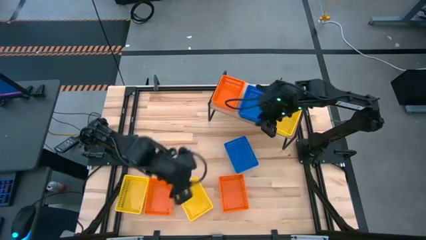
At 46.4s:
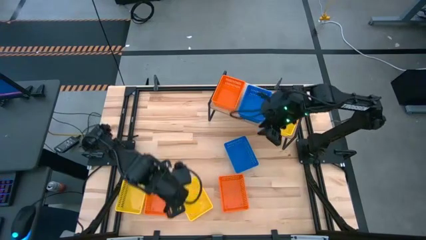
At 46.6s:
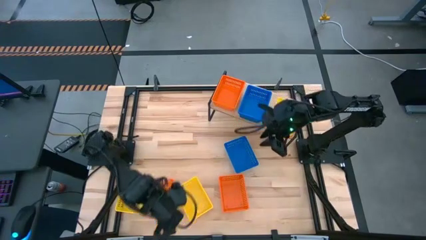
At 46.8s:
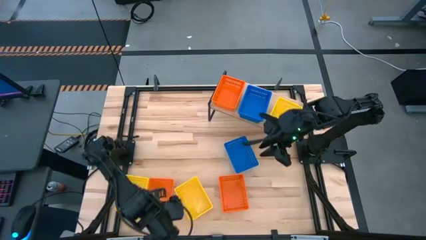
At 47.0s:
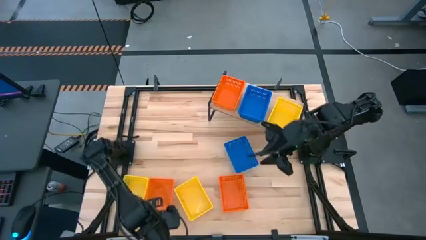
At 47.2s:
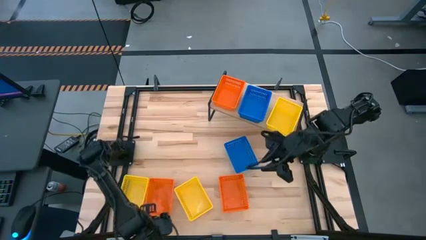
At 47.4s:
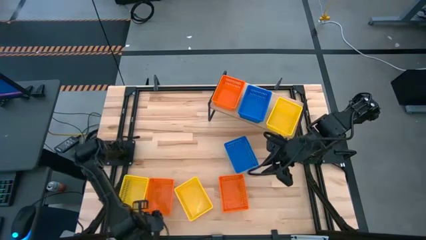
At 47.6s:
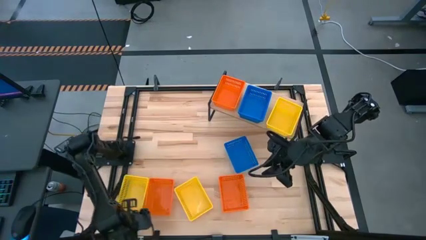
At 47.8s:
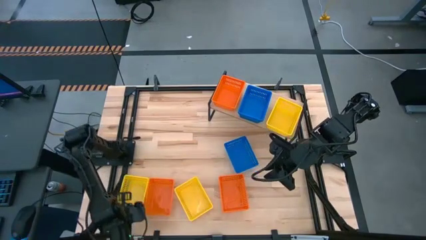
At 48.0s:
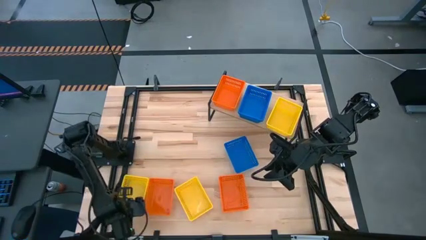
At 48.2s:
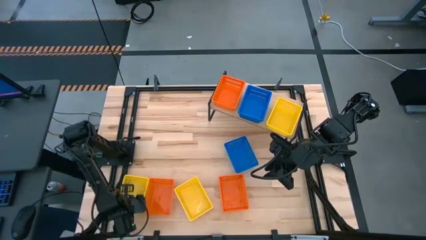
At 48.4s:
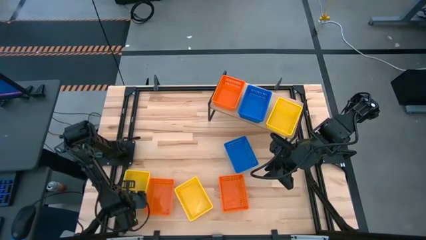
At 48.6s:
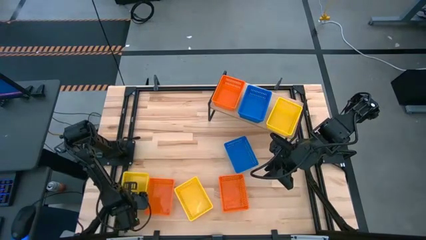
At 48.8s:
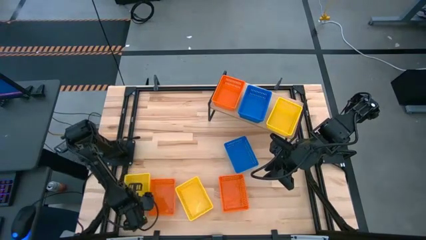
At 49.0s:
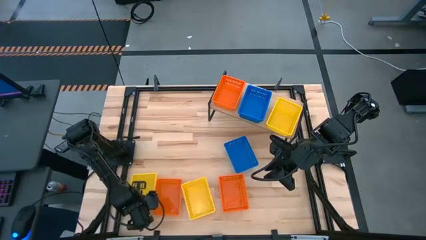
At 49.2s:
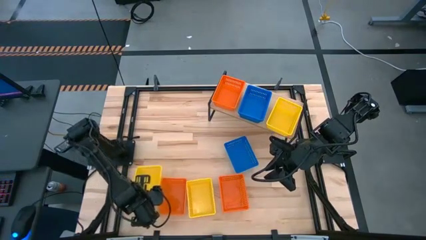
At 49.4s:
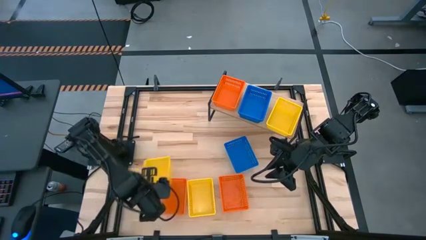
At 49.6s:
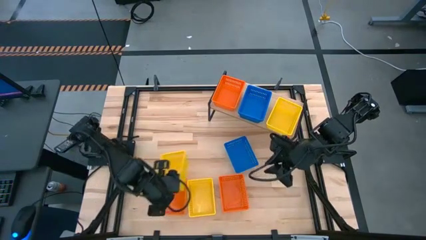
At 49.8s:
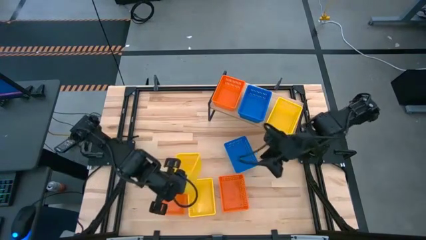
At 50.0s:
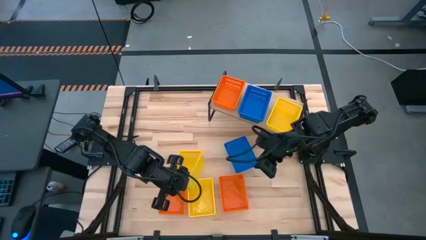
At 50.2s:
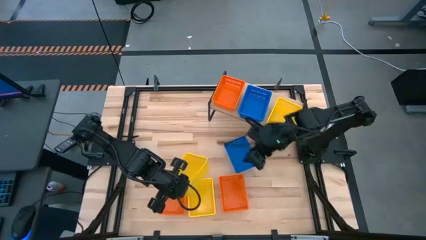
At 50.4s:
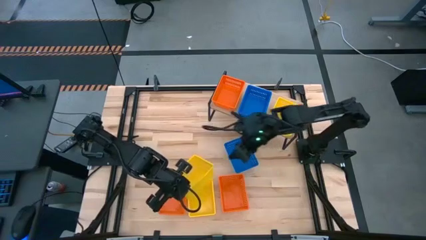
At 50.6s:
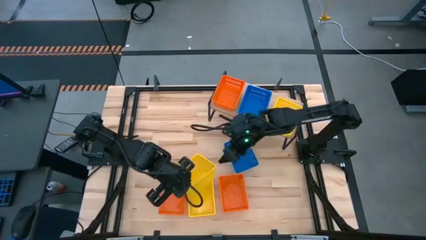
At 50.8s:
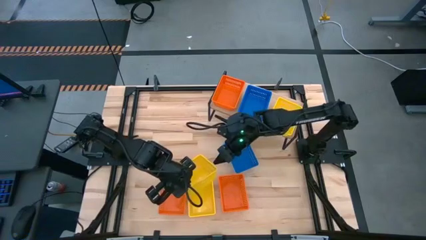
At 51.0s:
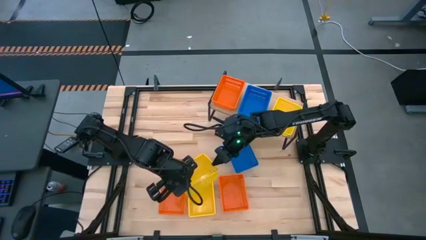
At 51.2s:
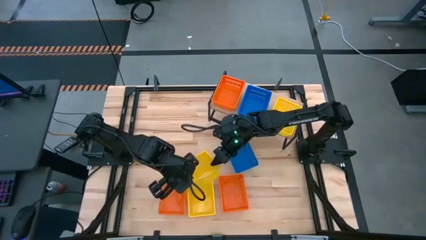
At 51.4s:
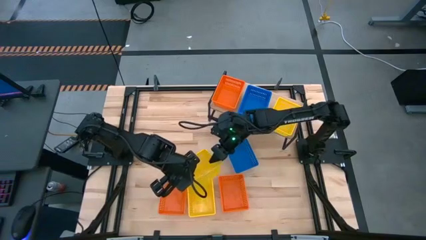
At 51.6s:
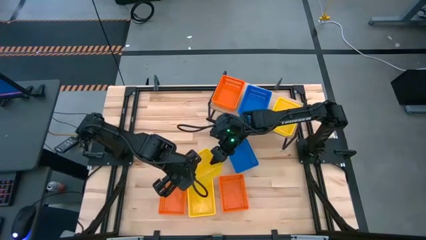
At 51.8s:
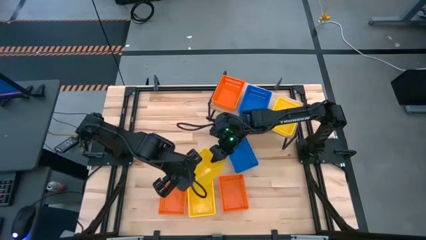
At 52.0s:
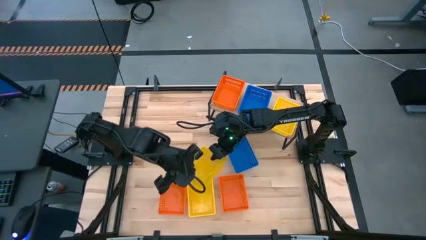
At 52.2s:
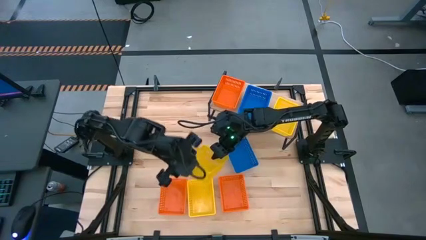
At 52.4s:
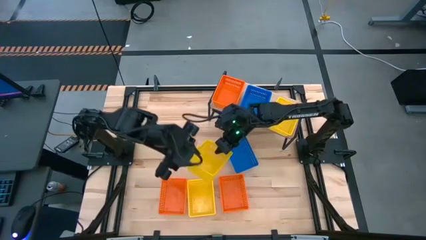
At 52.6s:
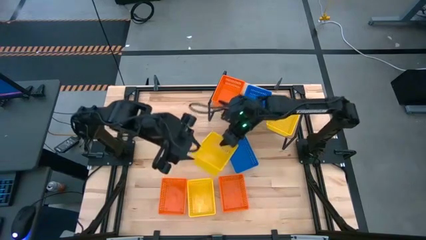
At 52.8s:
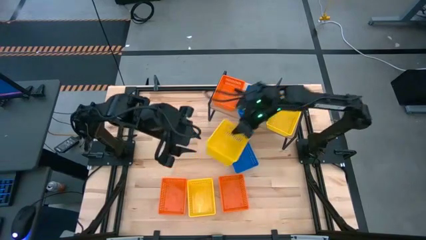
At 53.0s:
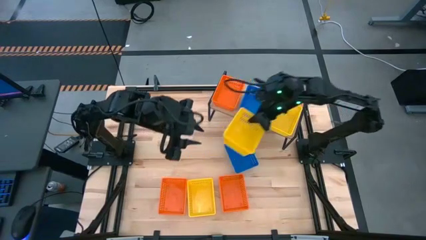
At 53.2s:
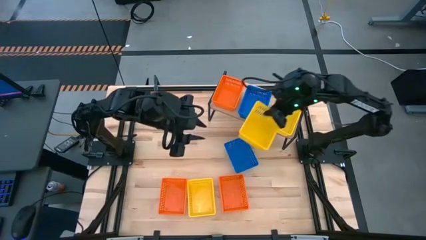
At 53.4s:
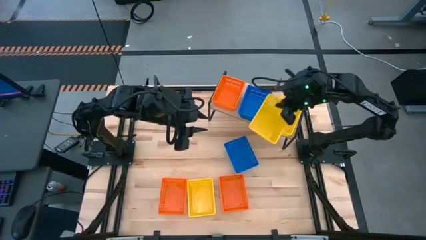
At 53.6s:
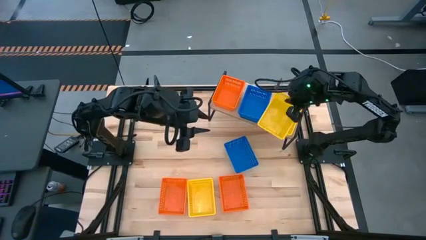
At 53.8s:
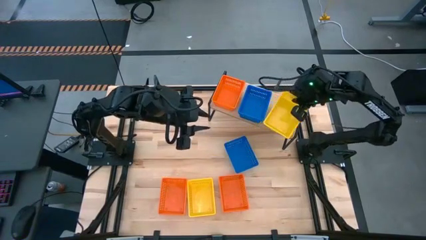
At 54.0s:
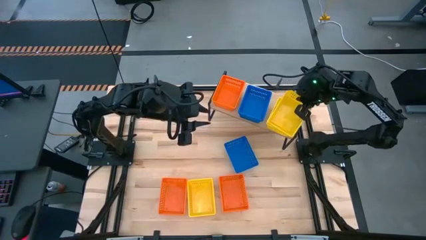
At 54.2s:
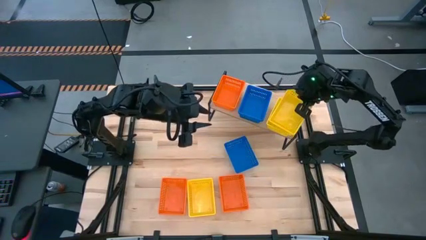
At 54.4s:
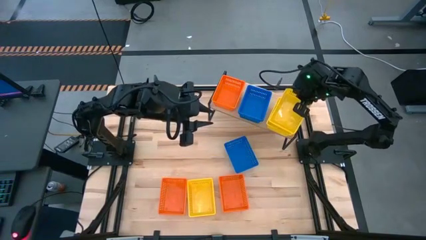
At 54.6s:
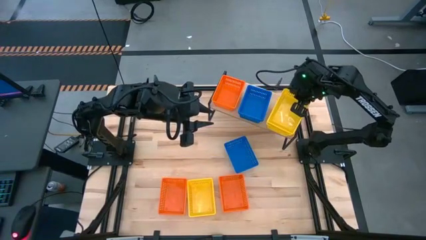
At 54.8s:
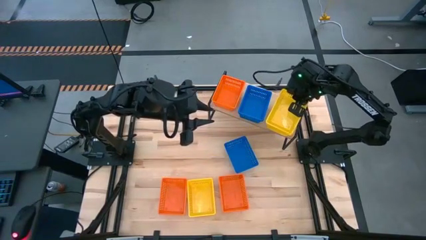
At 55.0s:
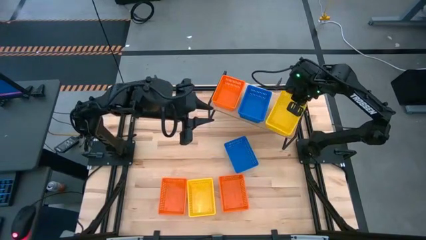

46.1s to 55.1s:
Task: Stack baskets on shelf by color
Stack the left yellow basket on the yellow basket on the shelf

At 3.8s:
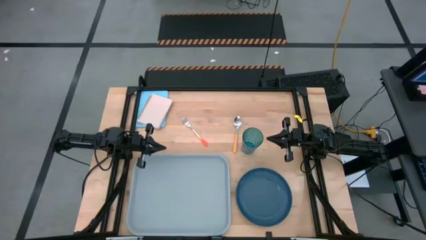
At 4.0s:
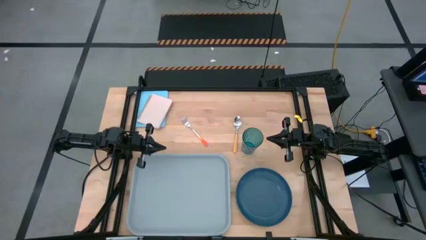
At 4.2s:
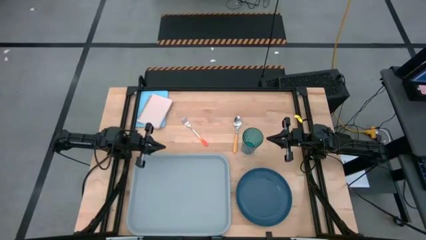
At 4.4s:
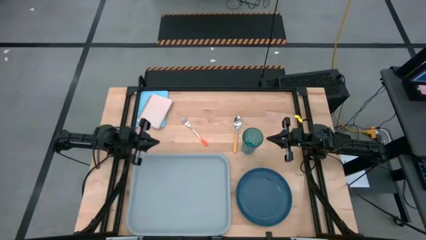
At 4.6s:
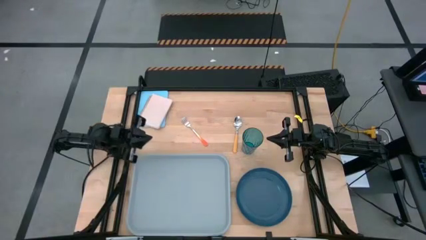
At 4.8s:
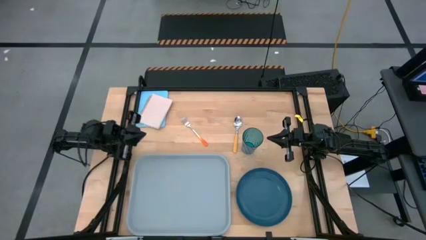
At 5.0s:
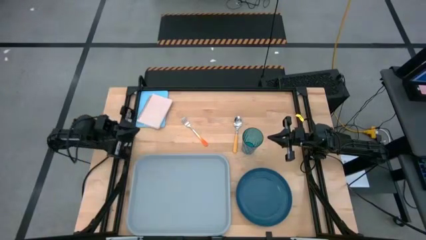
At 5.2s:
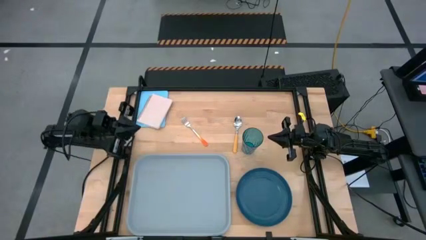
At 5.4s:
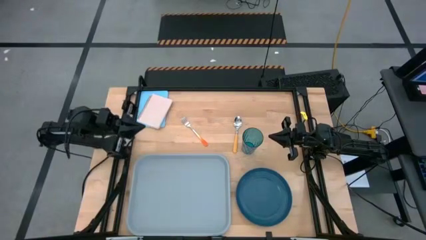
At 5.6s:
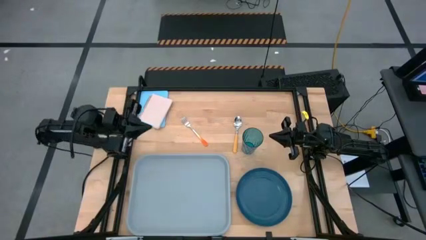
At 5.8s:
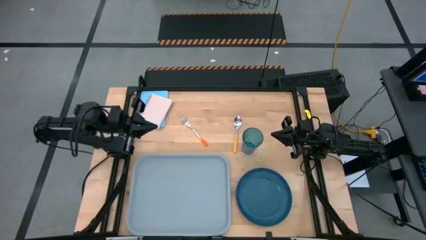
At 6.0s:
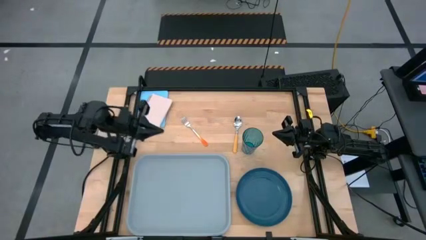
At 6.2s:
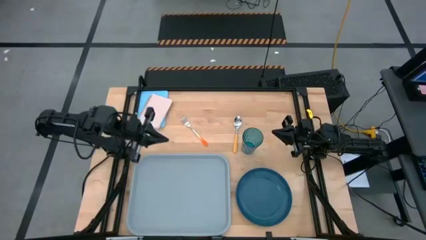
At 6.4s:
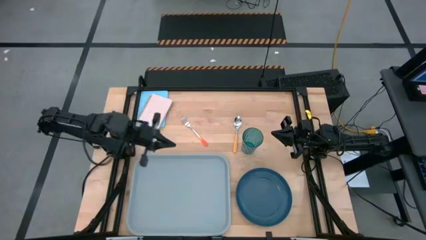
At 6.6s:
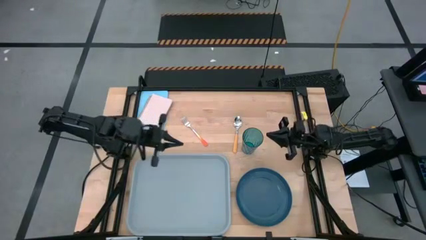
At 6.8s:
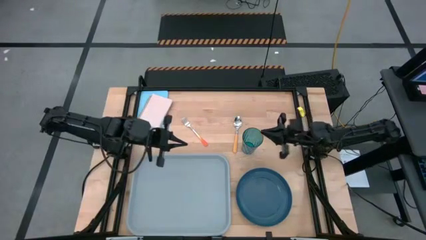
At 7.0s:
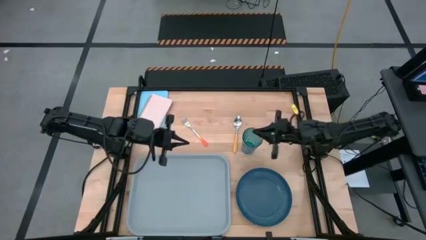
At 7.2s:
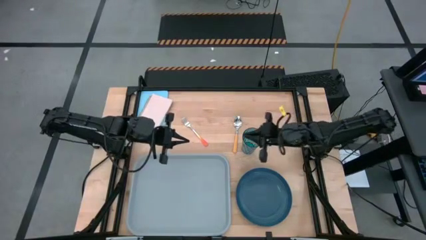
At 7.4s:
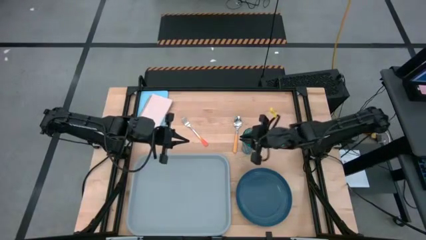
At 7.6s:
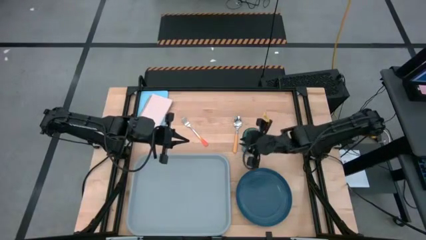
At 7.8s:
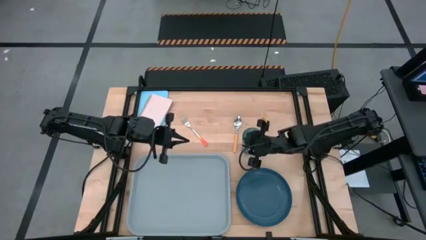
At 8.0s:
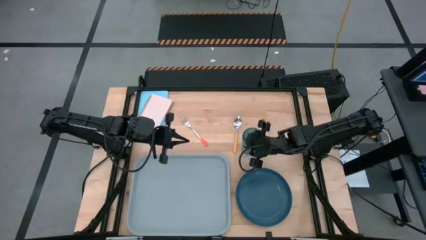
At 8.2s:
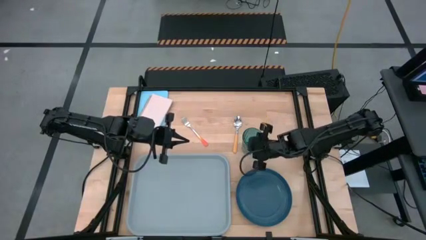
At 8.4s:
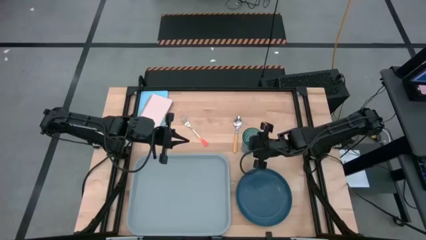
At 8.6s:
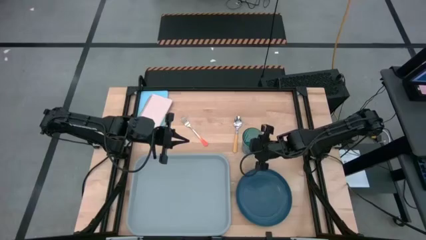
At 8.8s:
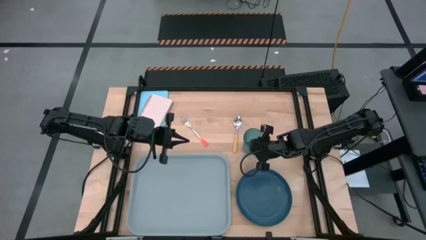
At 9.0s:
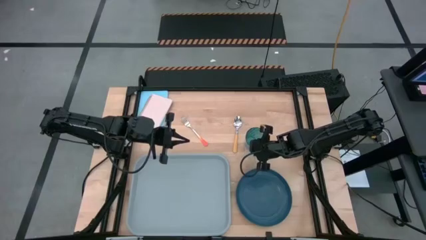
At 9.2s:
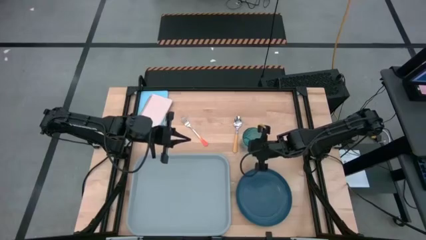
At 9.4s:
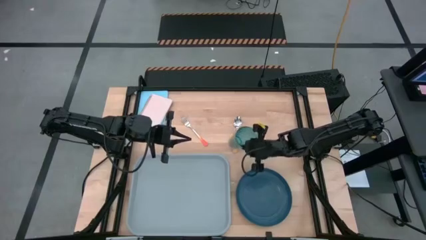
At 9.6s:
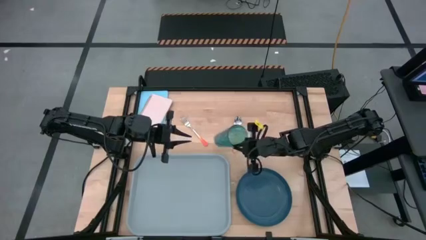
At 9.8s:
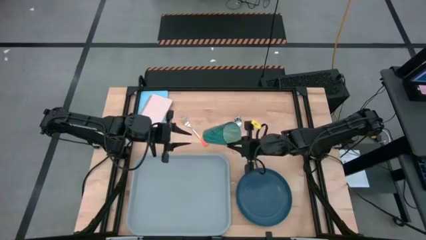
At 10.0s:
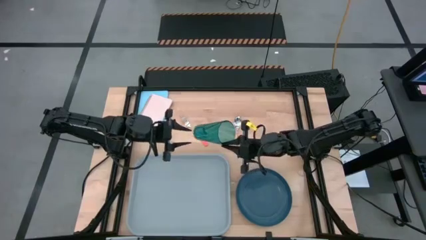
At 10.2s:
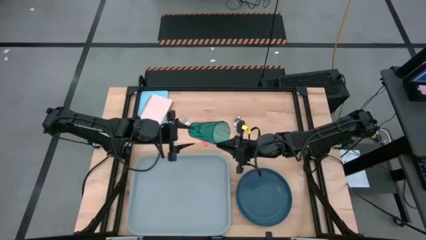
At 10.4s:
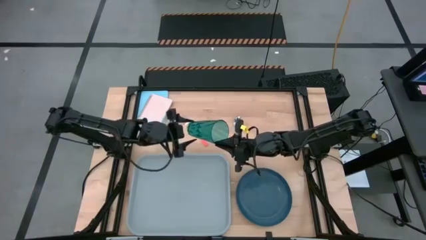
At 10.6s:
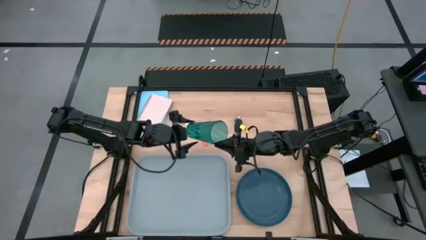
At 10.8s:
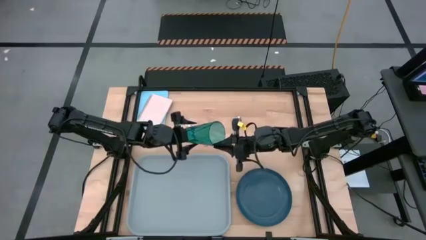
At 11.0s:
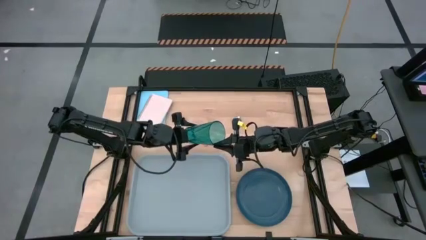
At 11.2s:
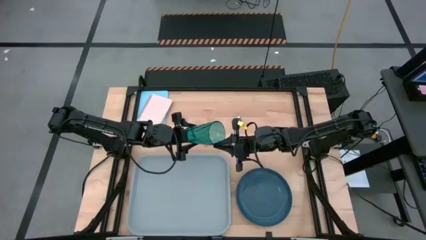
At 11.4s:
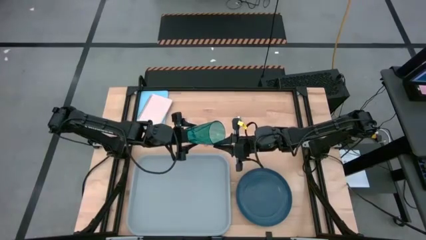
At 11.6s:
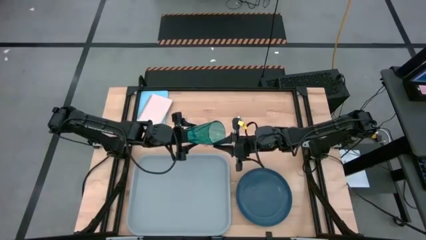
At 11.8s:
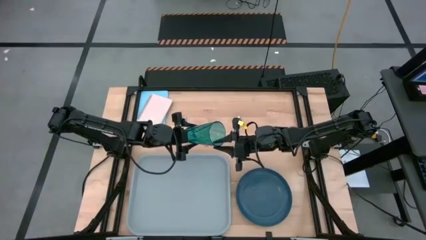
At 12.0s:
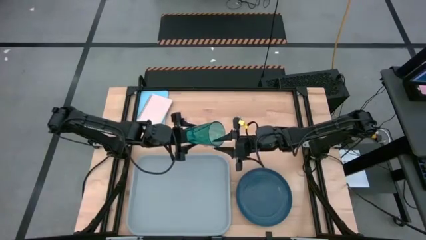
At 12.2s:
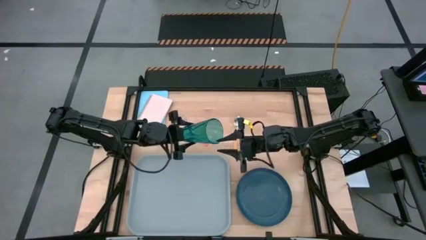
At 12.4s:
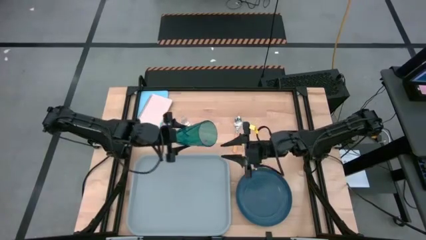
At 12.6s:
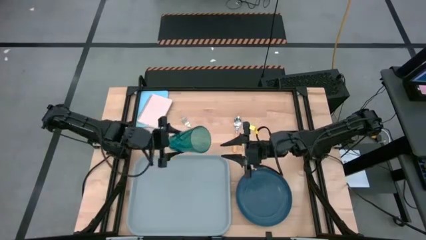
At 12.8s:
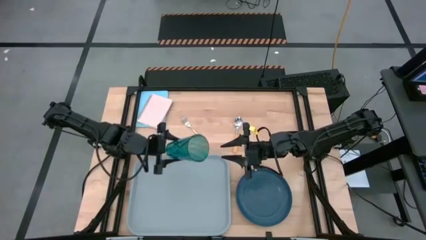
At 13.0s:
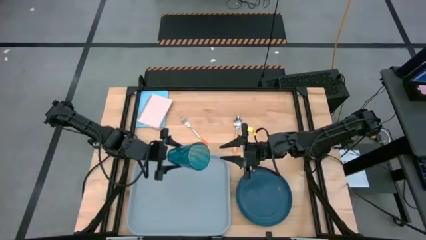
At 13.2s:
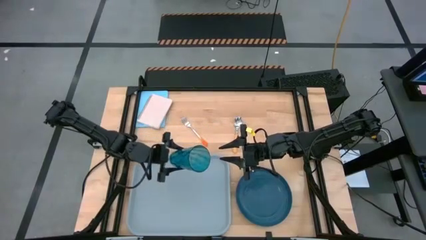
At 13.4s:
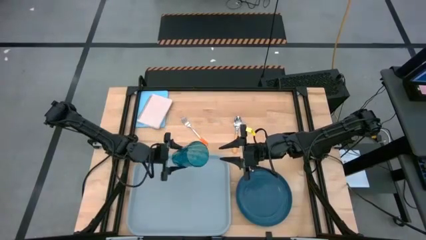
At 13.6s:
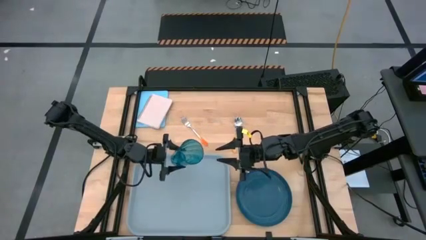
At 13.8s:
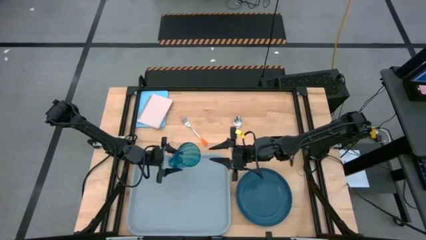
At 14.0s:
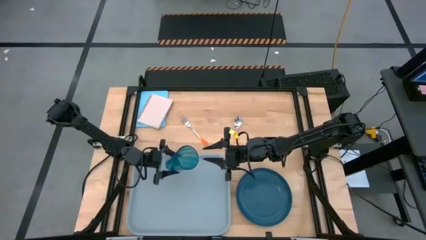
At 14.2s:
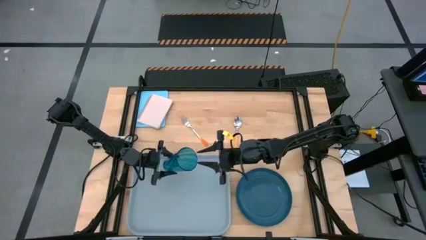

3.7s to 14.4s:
Task: Pick and place plate/cup/fork/spoon on tray
Put the blue cup on the gray tray
